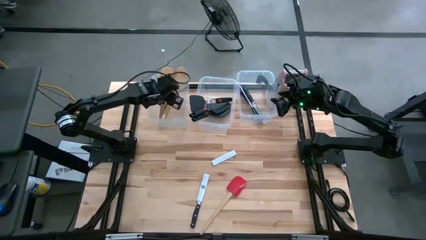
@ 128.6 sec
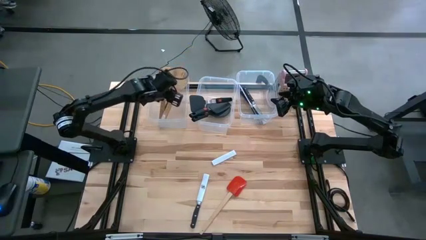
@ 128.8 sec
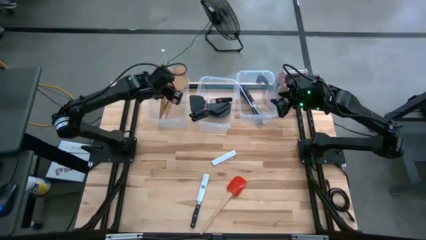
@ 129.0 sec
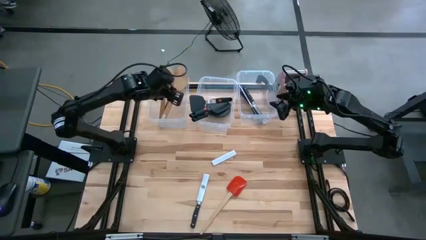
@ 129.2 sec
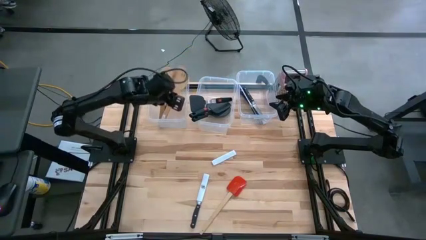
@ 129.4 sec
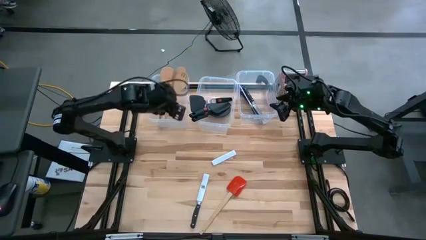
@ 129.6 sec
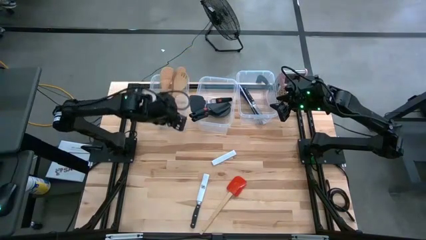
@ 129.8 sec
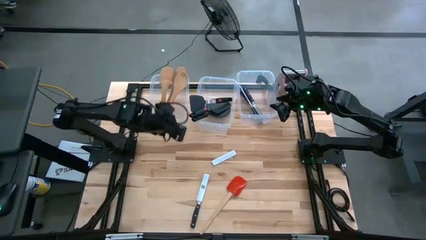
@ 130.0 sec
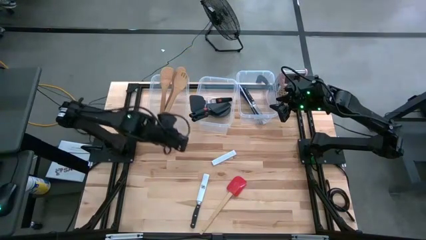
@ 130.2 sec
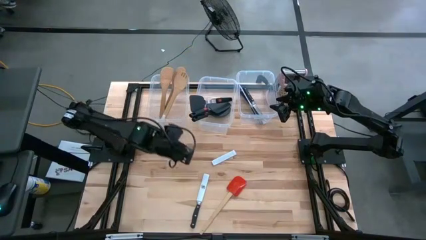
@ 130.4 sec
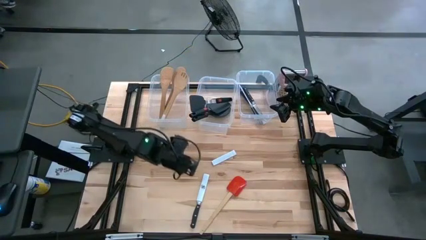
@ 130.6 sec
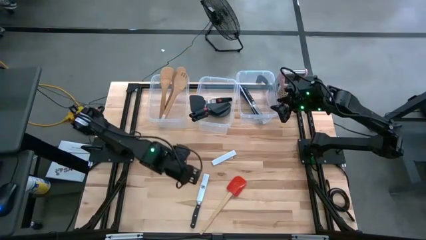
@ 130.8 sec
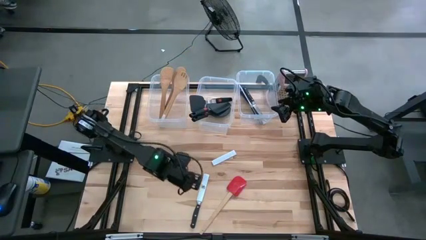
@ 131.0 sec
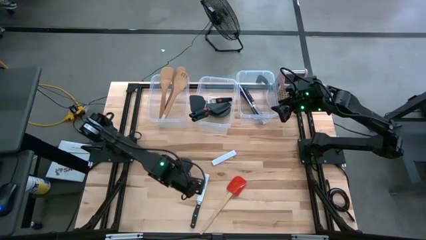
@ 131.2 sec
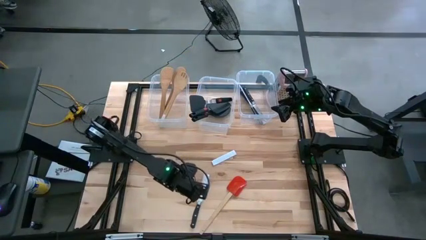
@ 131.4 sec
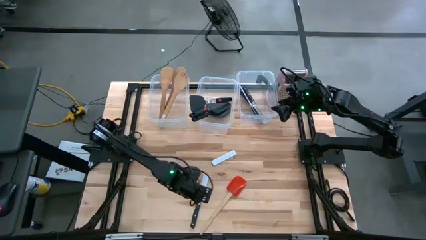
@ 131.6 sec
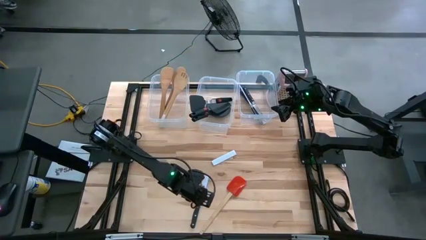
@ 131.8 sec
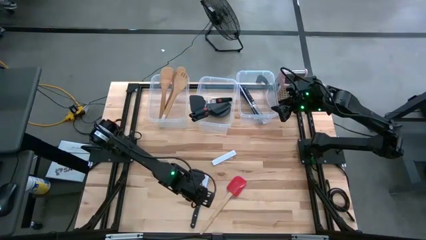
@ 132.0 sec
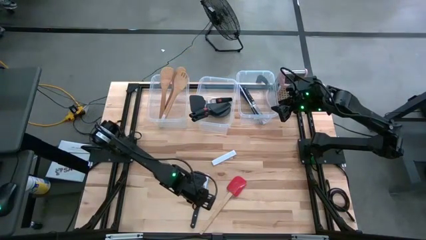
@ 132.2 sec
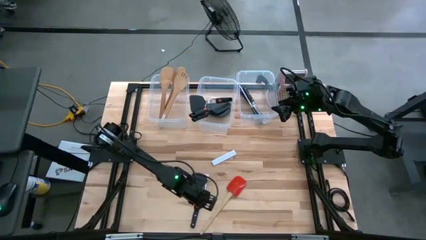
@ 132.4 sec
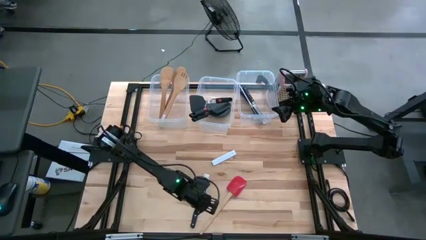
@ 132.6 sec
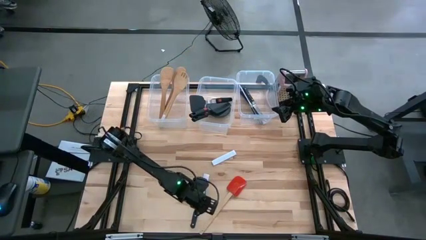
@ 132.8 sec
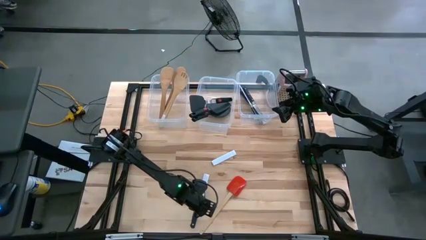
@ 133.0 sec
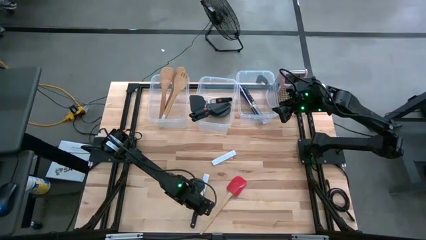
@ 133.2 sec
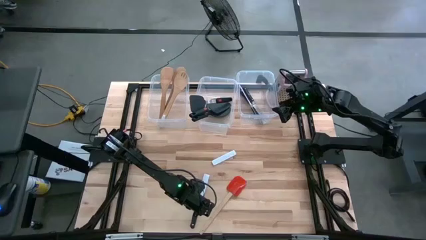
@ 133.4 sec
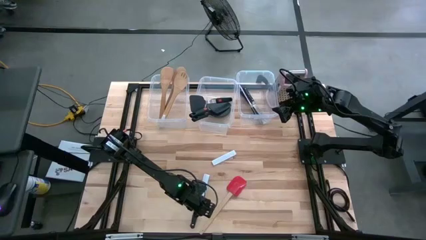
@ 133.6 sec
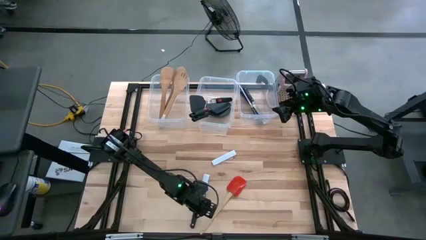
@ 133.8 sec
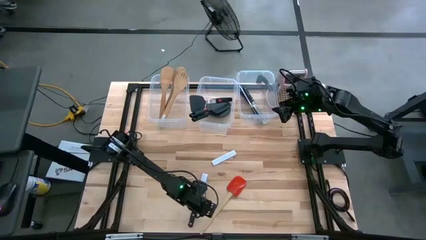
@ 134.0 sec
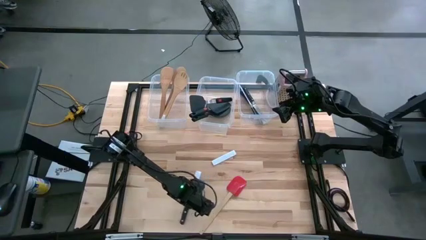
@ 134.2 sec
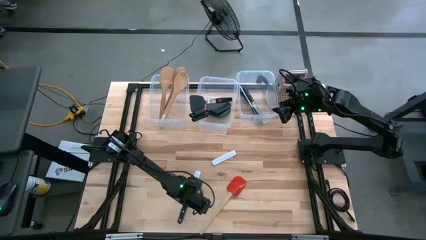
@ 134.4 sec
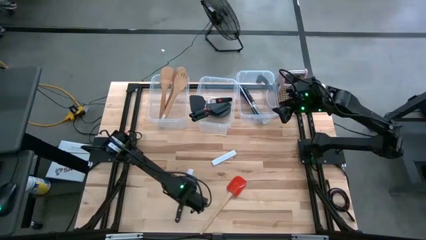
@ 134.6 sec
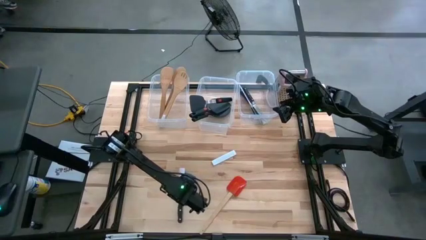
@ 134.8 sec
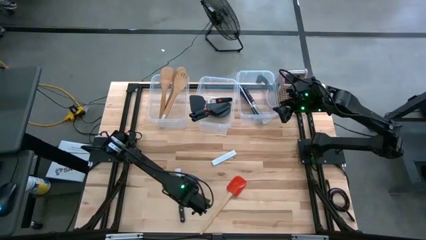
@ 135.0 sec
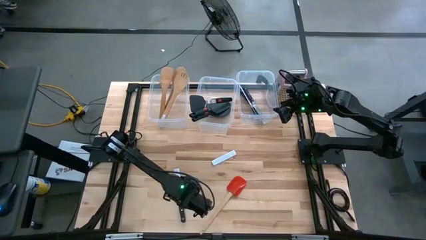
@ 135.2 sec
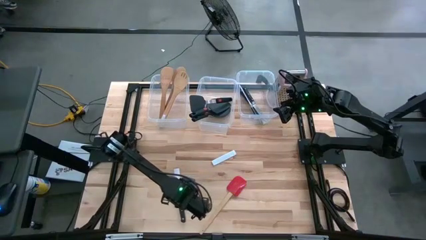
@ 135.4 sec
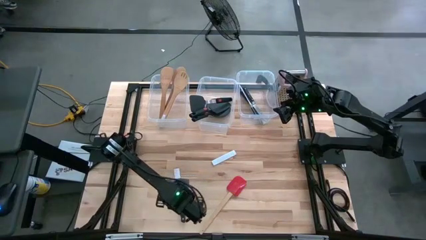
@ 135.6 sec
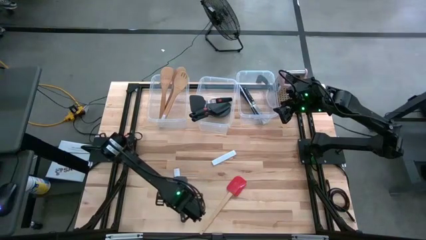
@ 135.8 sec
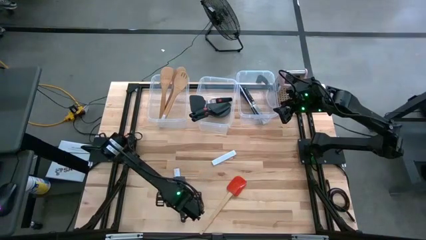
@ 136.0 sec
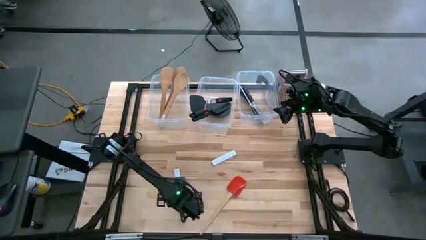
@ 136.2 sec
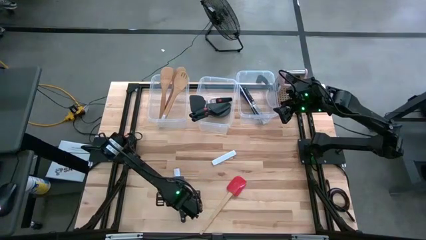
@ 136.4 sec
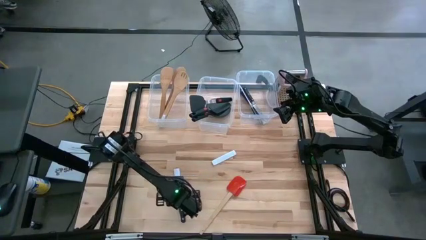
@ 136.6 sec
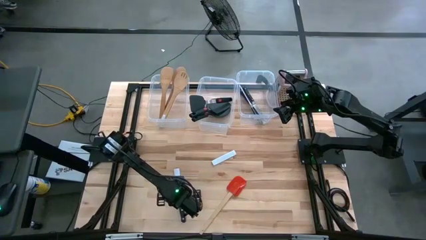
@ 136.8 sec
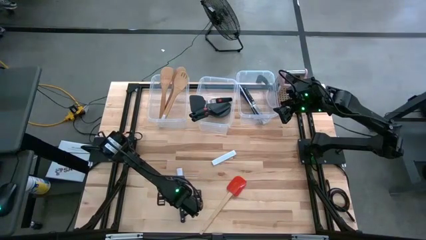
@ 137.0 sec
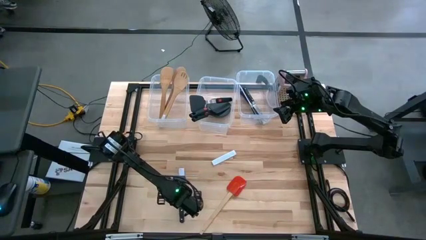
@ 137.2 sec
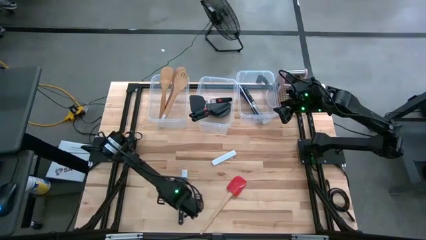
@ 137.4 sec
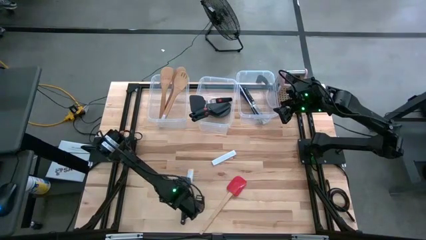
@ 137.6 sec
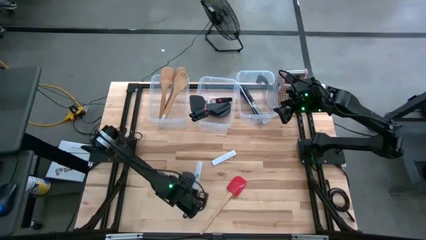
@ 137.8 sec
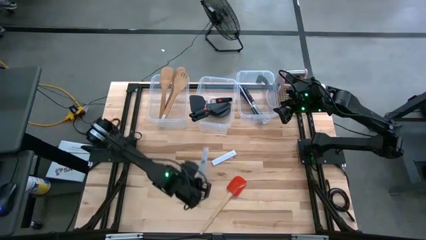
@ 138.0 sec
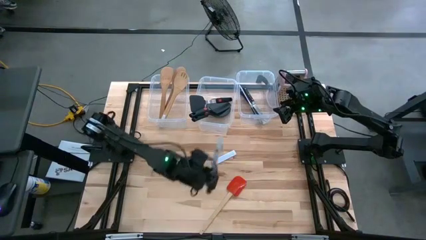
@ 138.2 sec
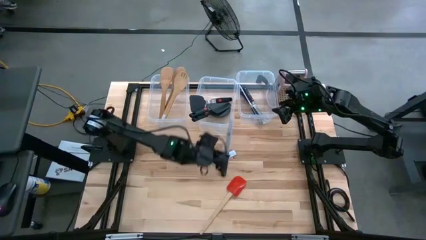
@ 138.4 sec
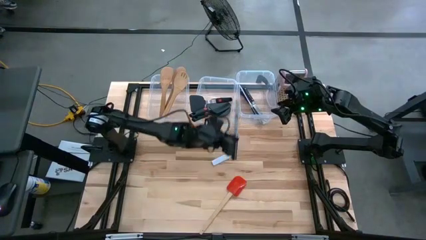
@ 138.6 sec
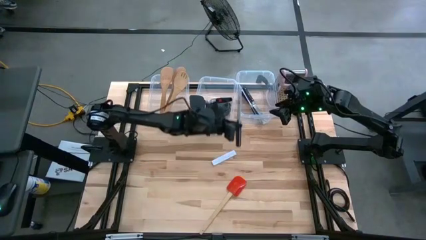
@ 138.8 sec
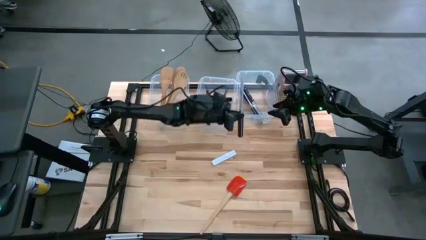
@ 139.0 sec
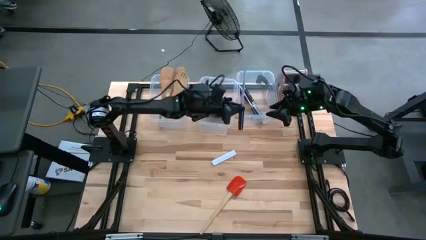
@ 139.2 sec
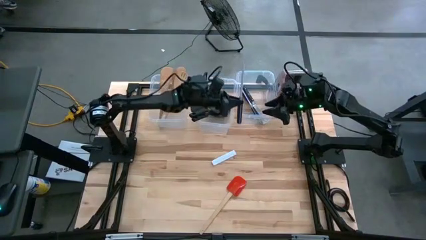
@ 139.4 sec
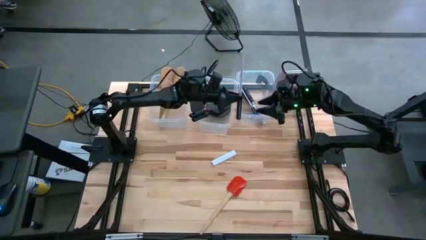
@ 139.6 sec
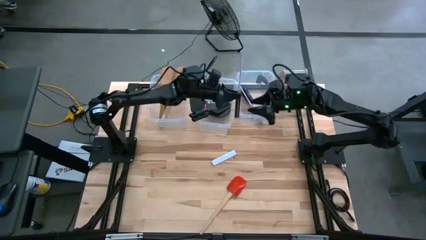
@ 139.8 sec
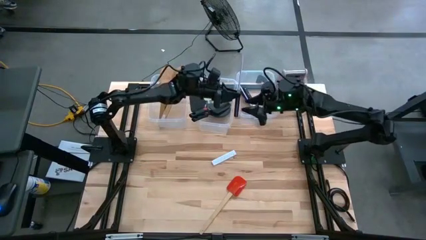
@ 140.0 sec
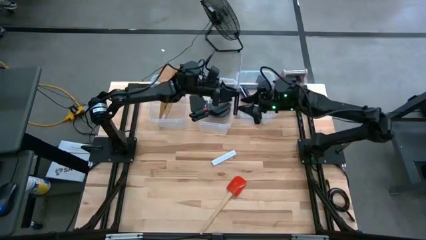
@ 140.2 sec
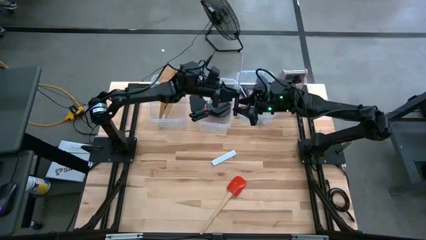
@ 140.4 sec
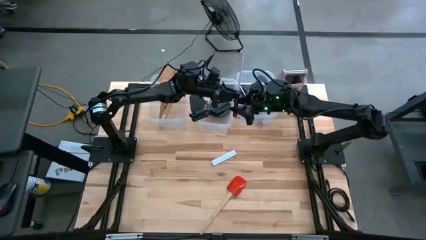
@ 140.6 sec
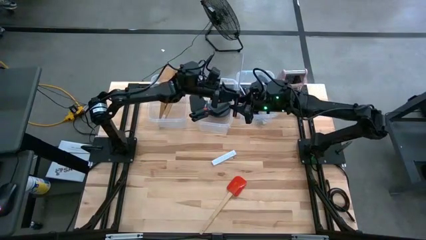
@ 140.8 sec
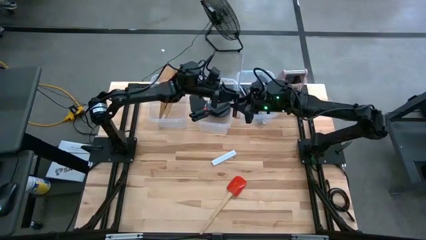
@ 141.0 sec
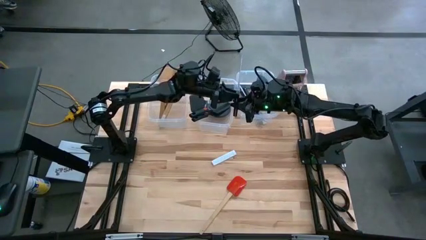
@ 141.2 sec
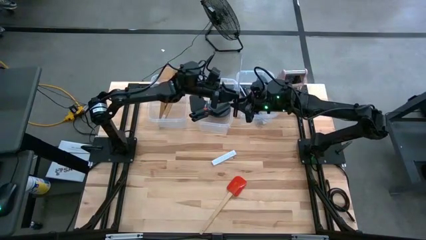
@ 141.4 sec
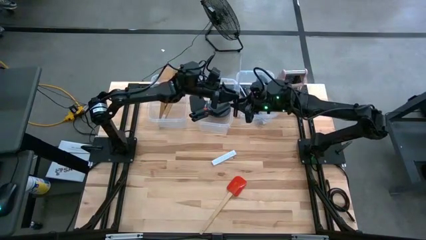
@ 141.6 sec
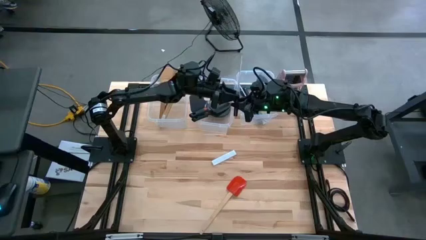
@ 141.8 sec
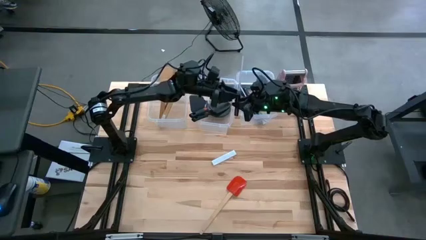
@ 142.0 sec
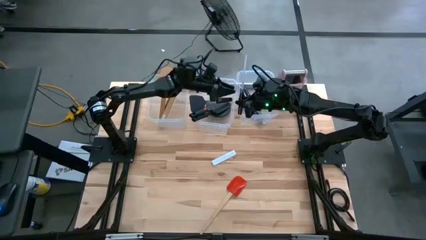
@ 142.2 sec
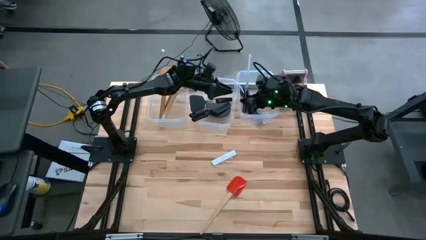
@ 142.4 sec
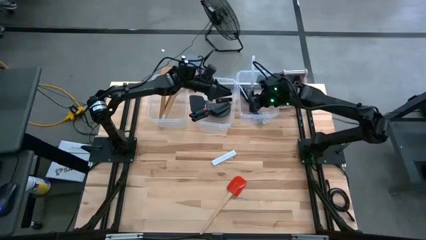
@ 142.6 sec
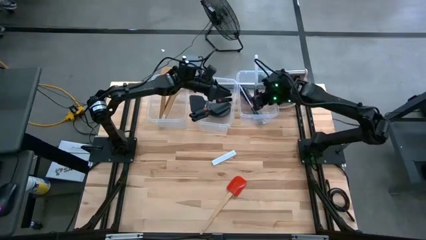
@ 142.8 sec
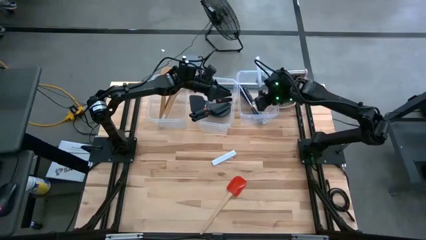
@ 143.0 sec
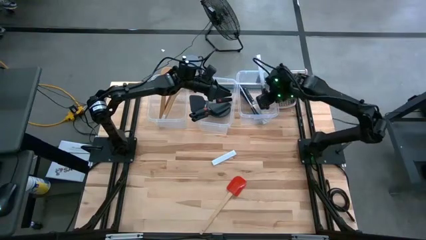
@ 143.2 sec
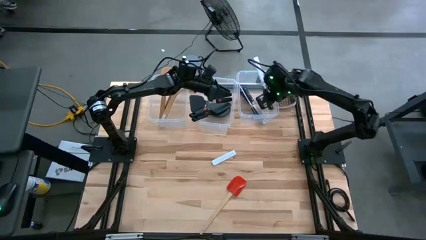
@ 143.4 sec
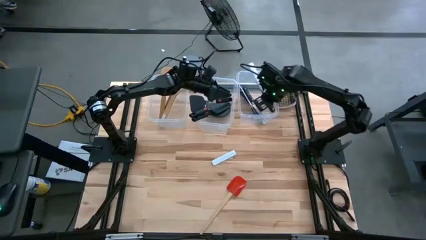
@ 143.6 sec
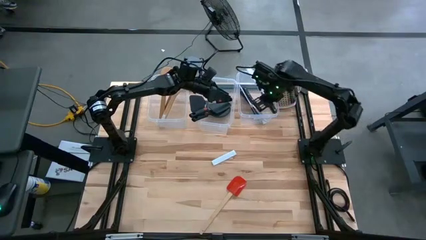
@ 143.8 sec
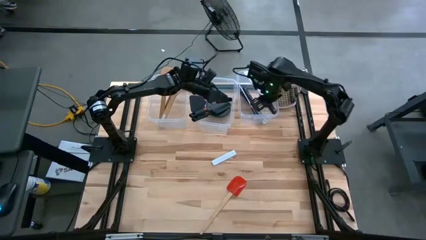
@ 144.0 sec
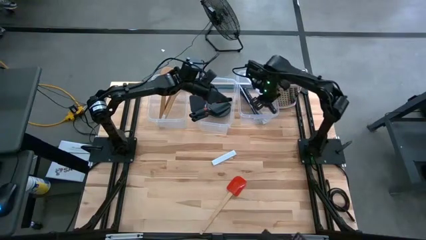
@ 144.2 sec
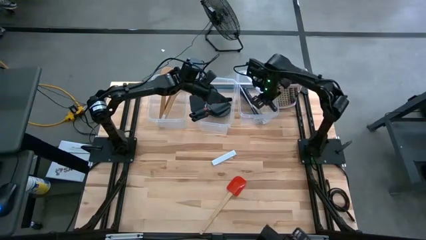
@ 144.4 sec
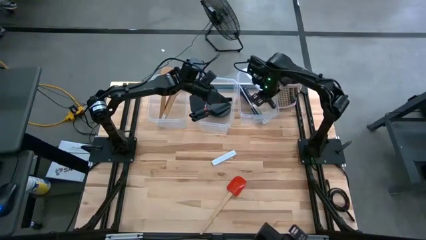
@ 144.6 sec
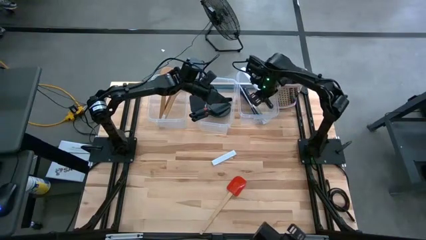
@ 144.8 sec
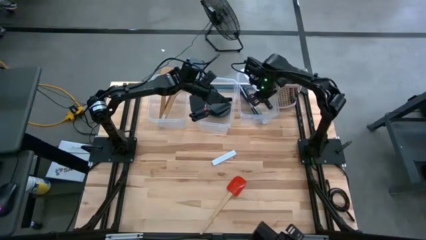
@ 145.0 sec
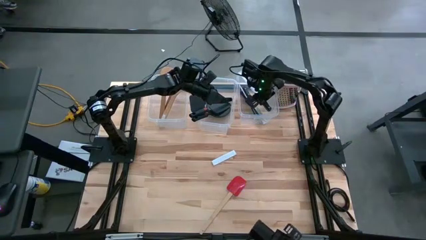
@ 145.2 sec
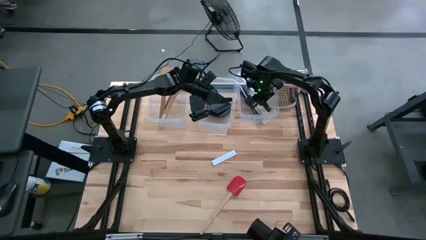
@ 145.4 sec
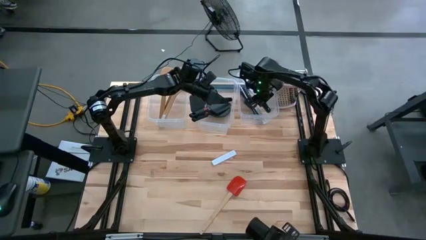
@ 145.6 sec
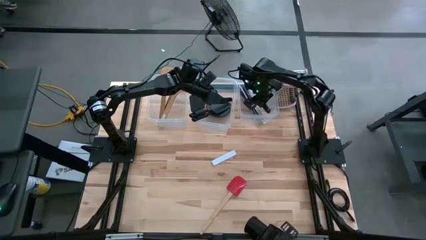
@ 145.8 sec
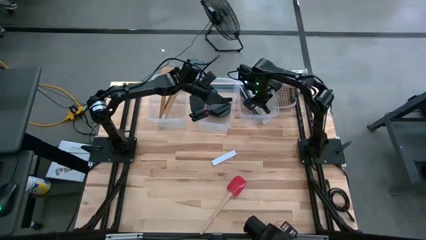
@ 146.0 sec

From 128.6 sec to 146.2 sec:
Task: Pick & Place Kitchen Items
Put the black knife into the right bin
